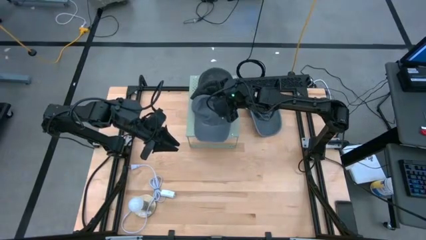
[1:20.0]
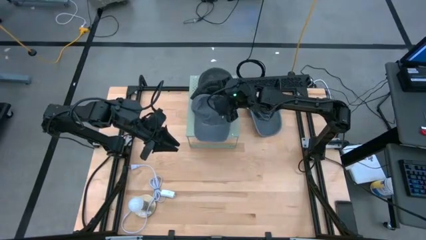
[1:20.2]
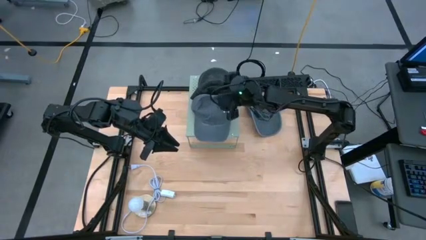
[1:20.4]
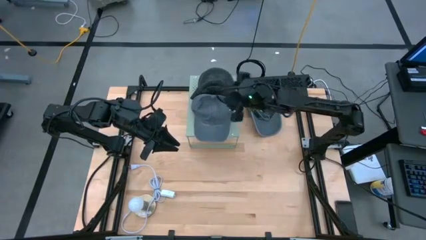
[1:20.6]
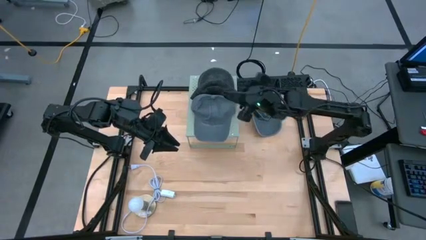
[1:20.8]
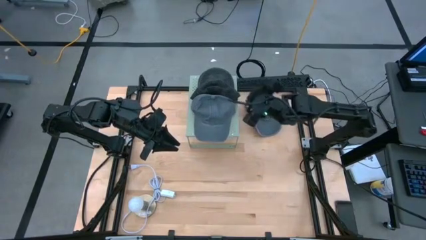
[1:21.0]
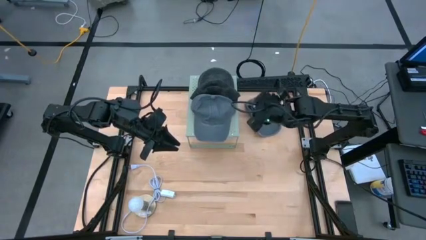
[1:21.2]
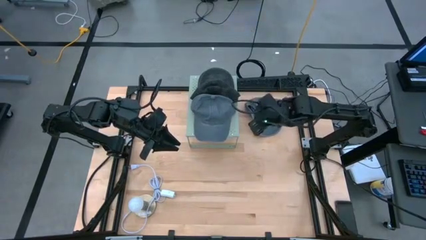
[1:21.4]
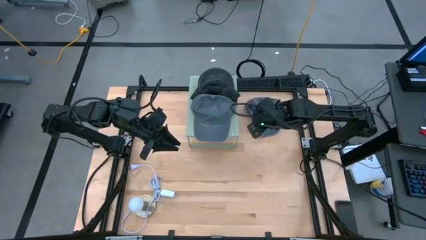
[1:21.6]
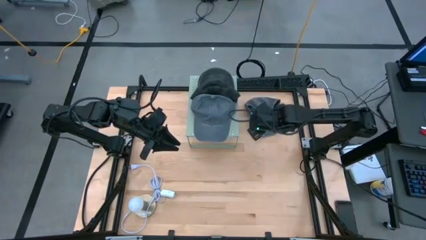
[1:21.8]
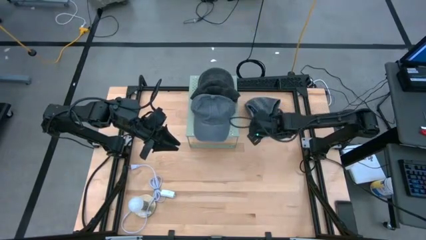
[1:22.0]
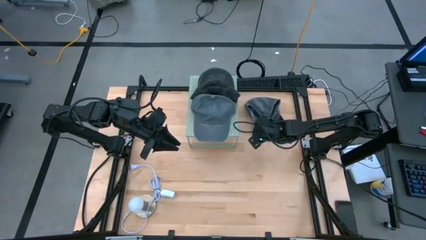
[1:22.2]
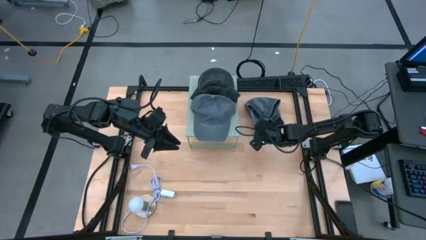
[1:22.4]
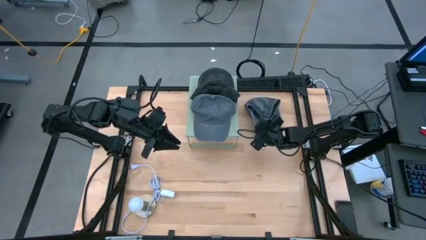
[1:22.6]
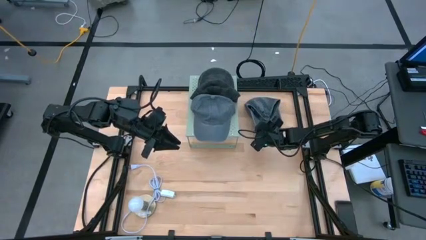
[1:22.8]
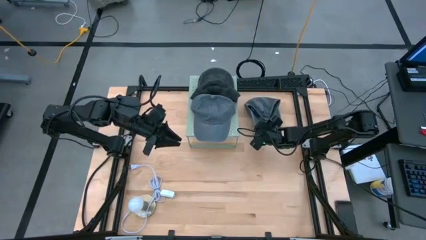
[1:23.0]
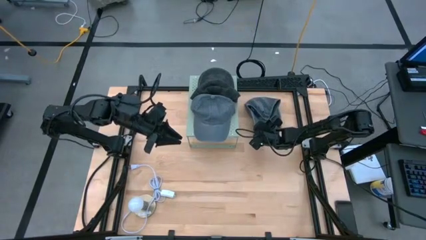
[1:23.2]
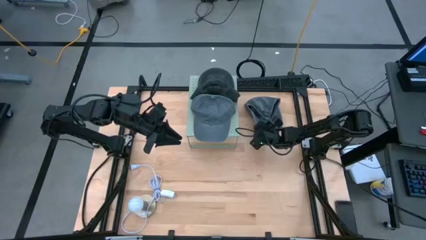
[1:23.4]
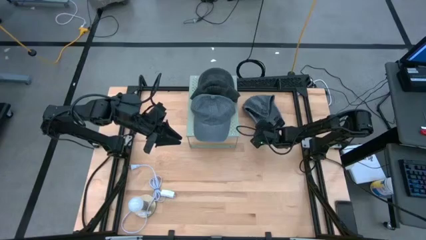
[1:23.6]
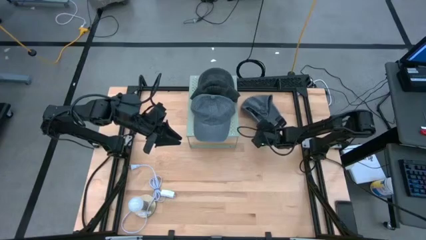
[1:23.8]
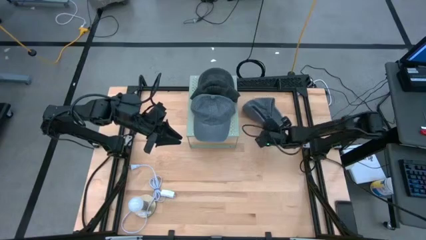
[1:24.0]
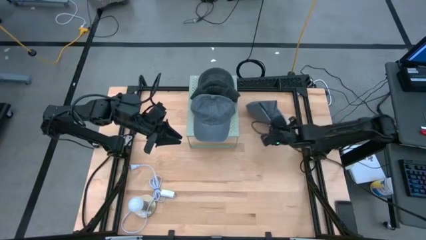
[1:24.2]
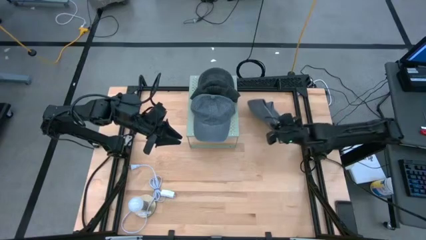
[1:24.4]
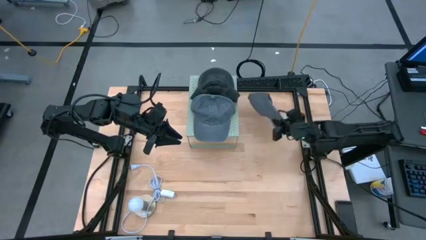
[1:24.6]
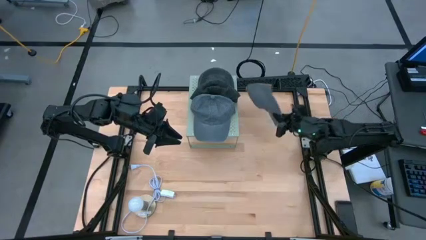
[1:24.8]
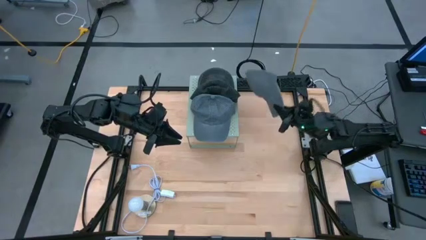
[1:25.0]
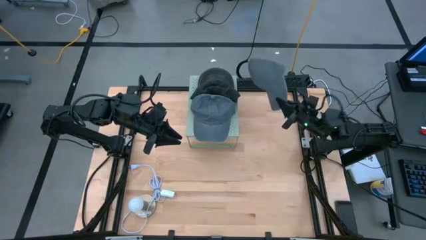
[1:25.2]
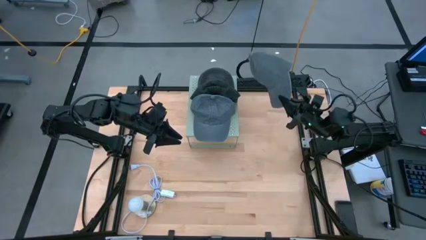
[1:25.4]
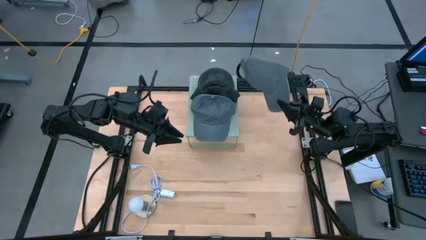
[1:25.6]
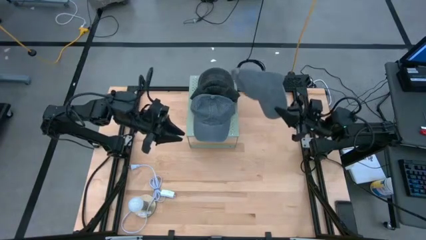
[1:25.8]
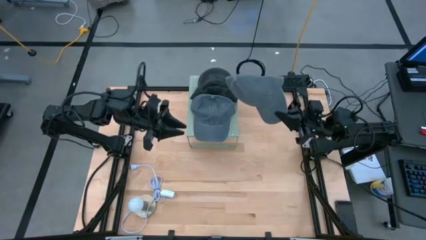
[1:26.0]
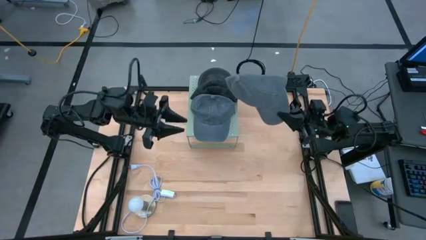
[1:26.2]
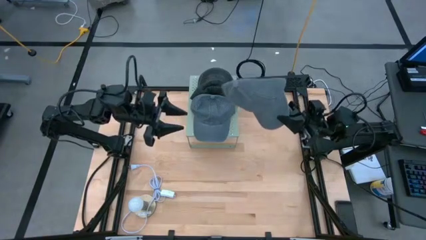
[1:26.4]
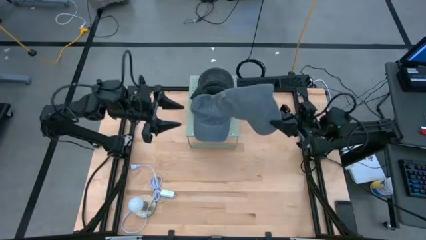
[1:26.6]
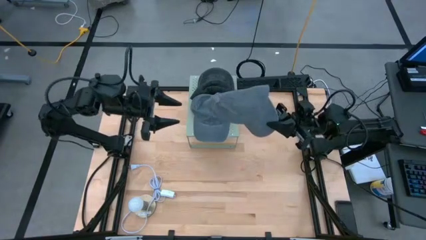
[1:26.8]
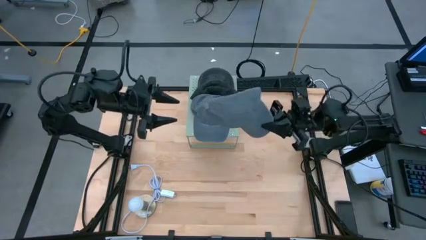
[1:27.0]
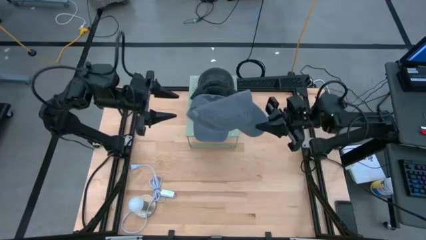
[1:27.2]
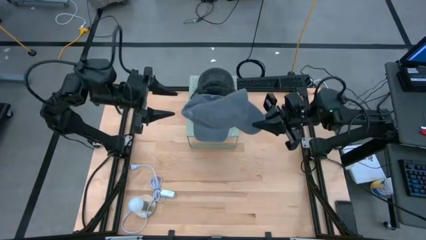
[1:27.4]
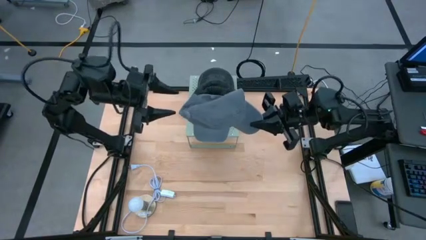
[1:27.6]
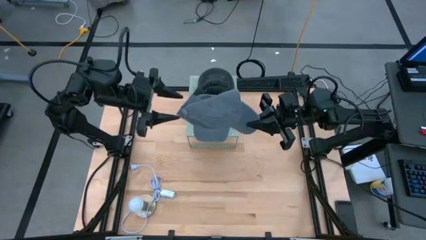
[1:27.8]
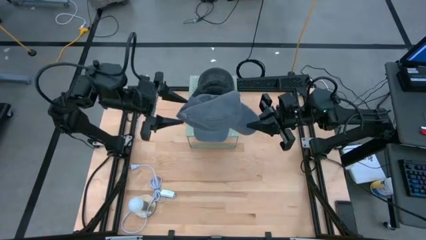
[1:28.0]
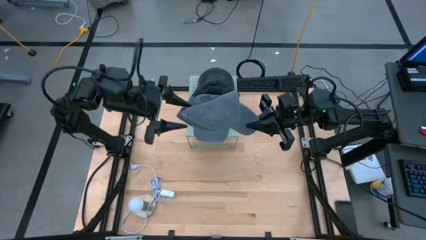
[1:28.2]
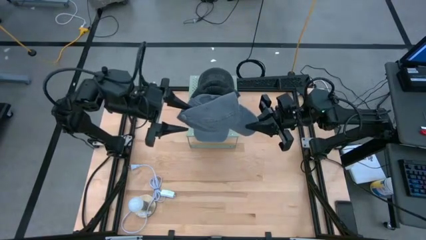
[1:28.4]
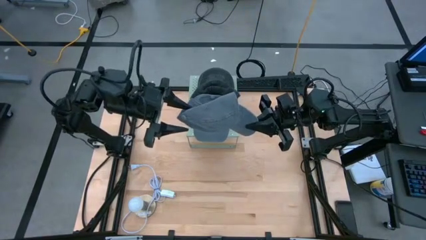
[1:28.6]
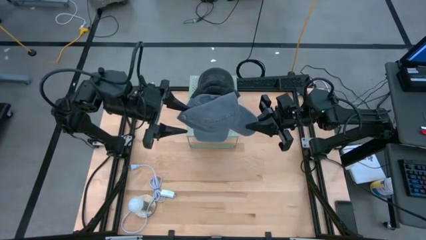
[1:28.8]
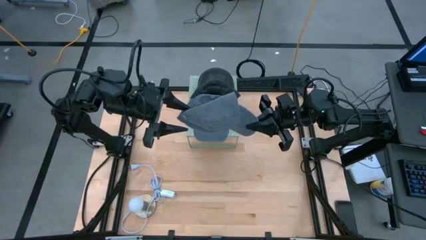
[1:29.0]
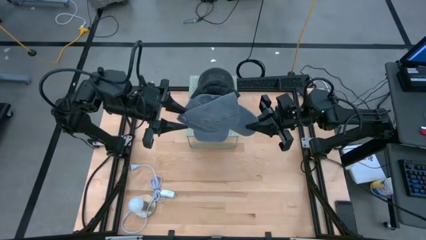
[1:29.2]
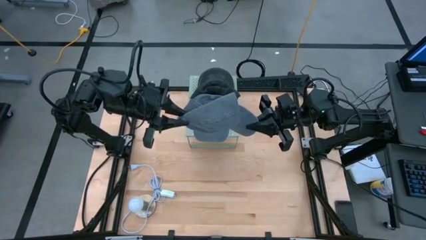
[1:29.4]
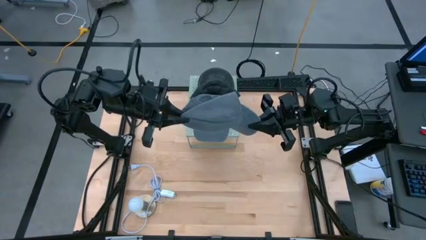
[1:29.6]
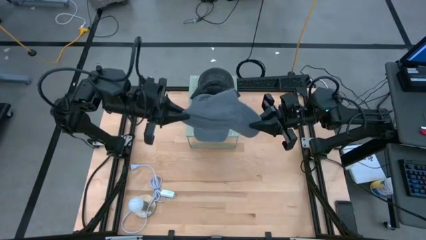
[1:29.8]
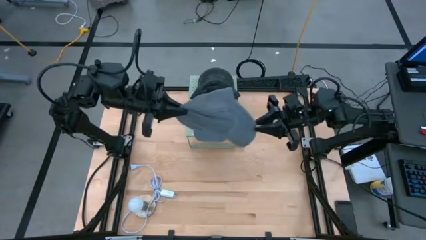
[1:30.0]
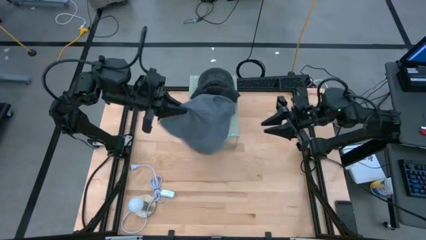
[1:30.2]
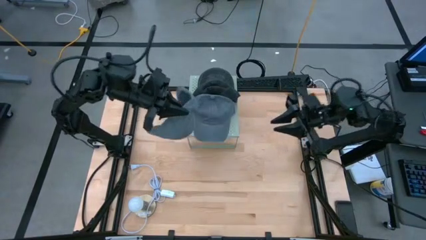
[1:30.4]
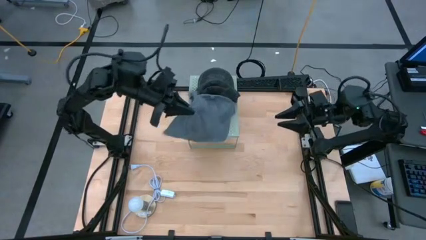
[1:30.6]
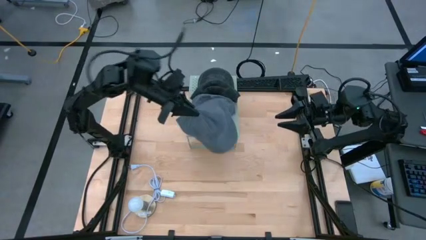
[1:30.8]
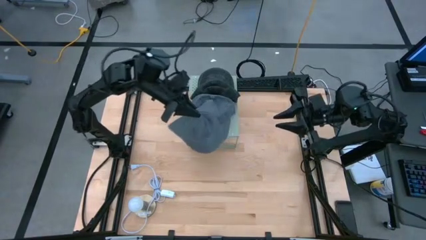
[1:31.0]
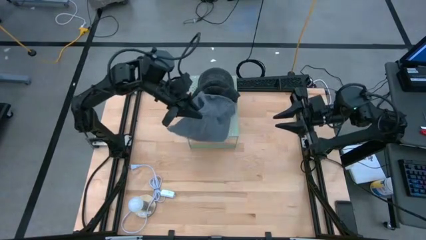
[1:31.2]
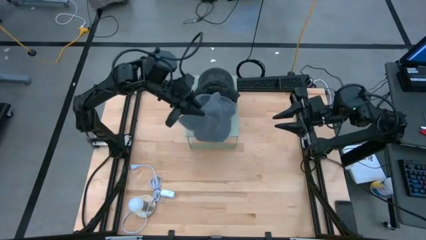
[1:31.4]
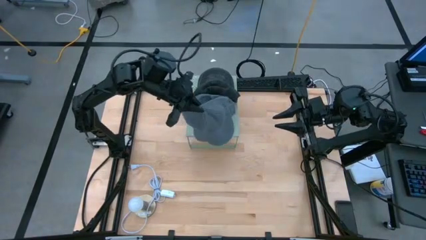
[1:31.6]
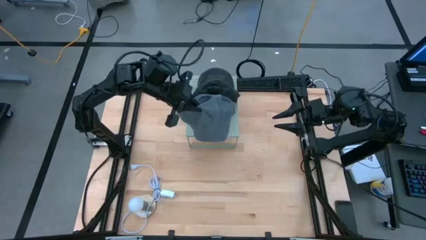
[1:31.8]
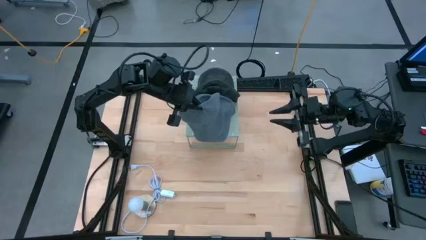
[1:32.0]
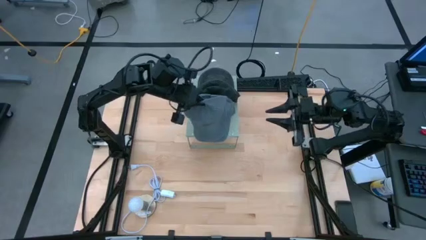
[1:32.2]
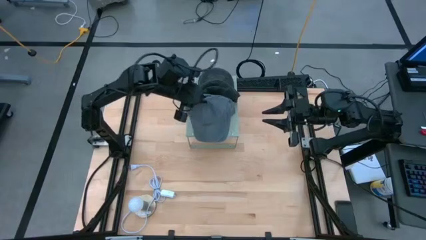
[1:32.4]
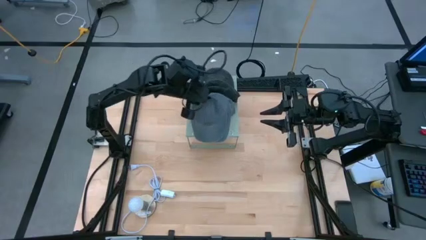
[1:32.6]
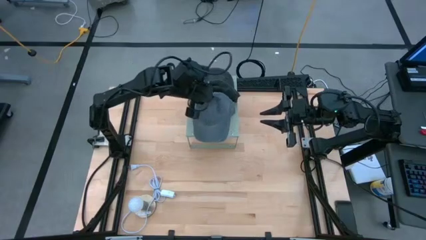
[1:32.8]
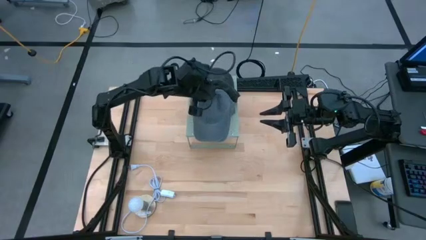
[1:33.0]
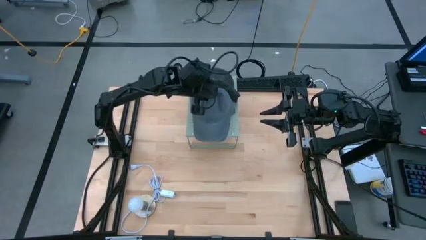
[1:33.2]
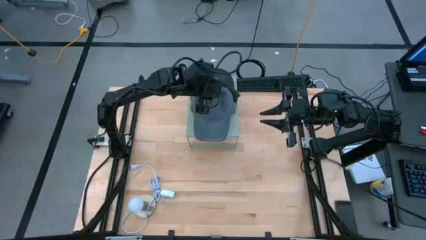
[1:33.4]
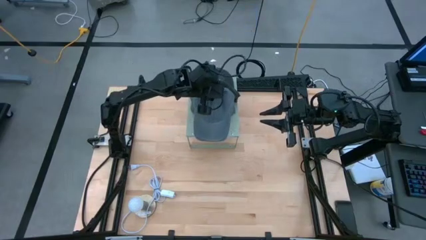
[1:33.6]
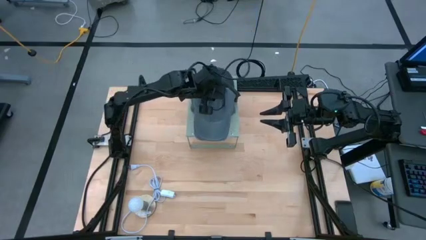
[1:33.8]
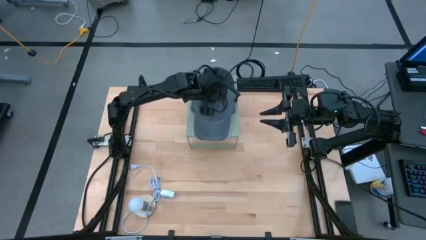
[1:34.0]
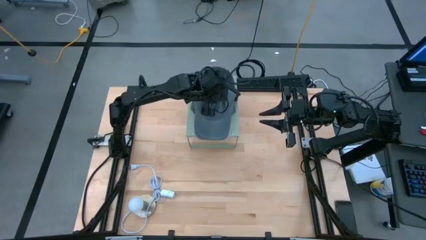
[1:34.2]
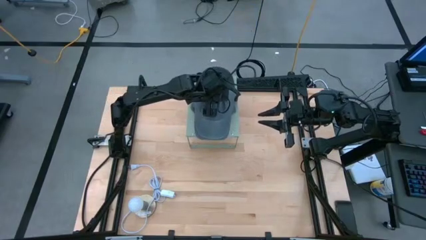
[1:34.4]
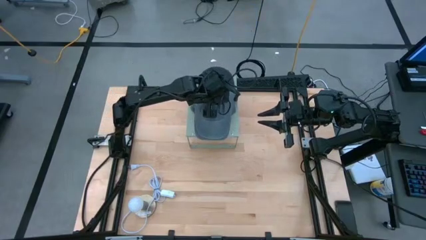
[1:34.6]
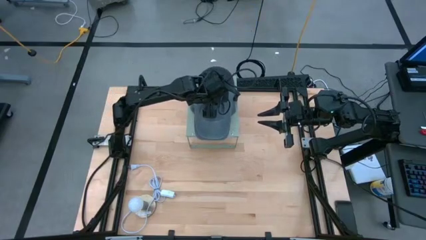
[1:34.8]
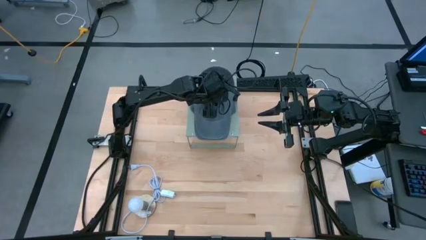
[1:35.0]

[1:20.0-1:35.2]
Task: Pick & Place hat
Stack the gray cap on top of the gray cap on the shelf
